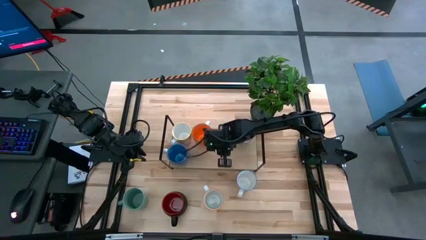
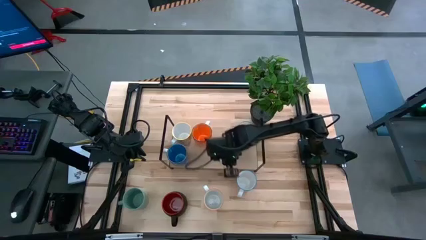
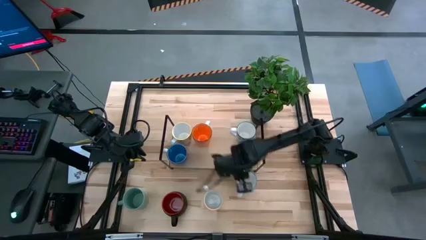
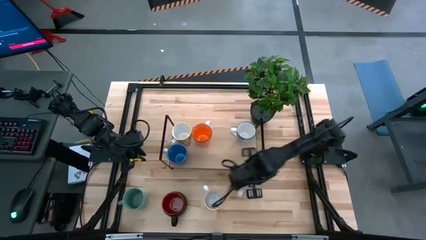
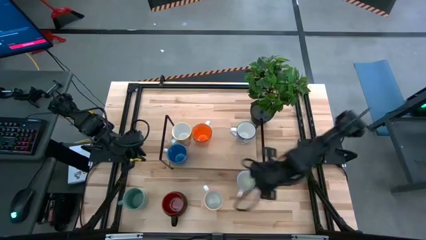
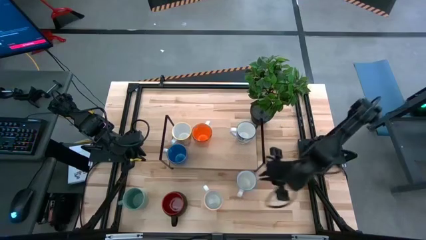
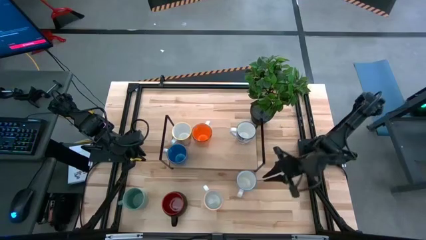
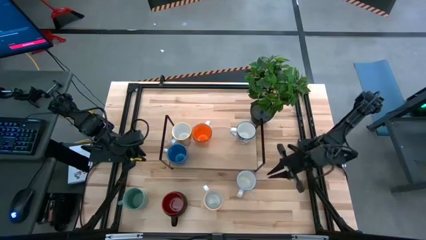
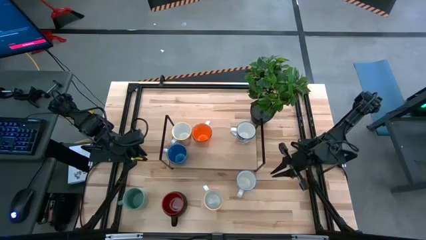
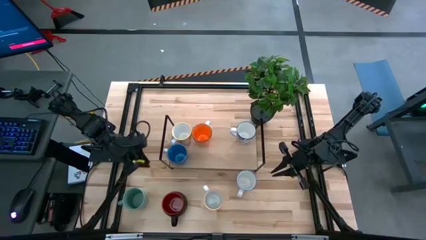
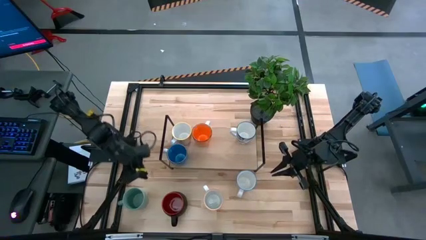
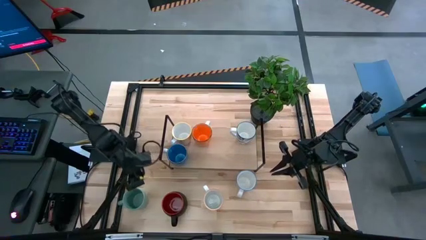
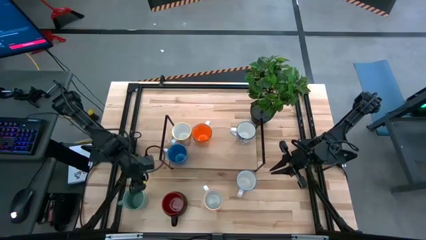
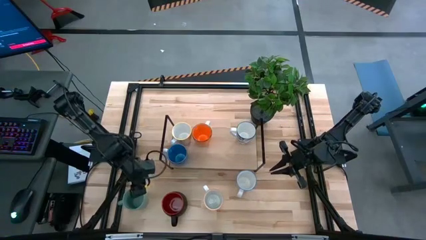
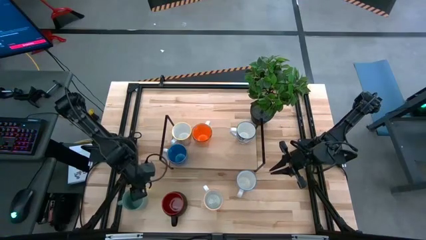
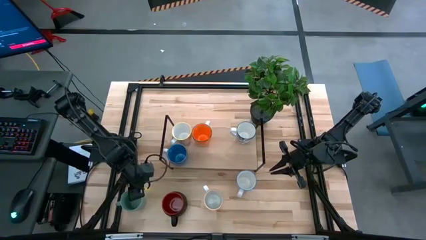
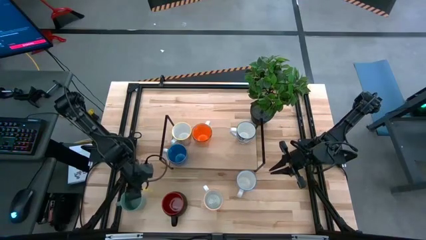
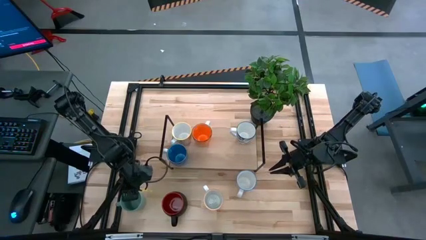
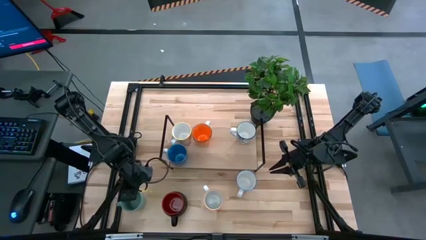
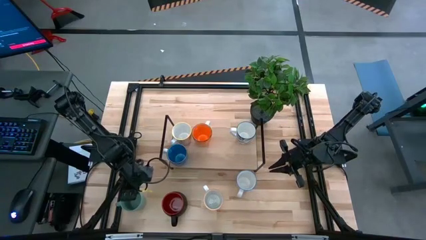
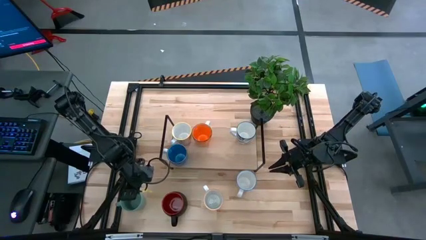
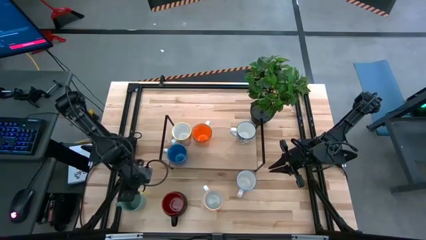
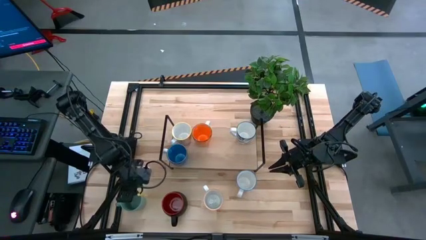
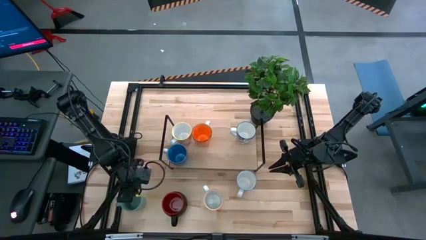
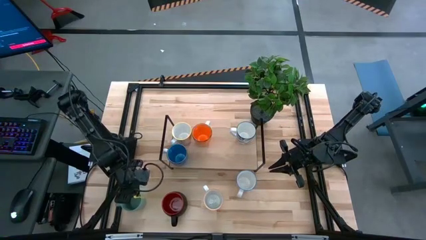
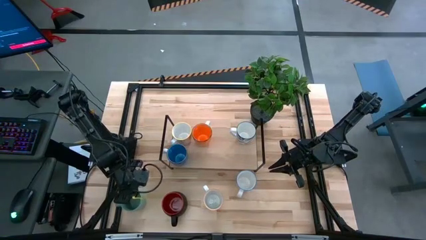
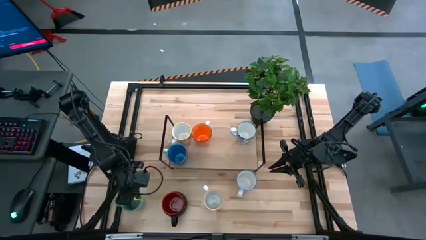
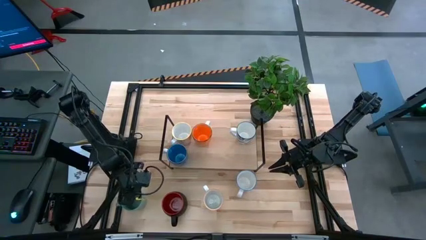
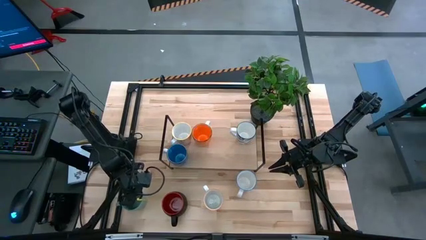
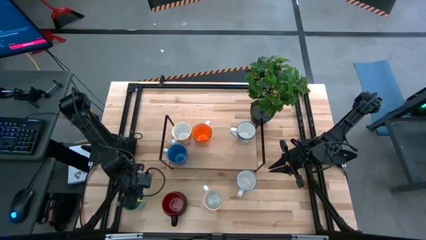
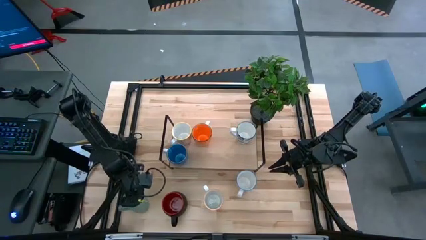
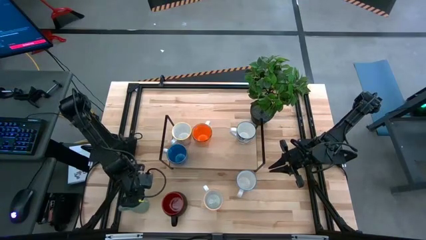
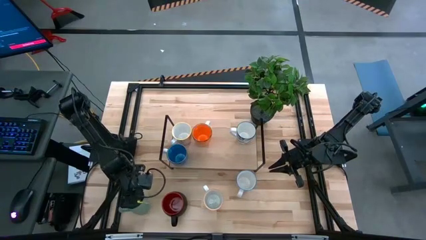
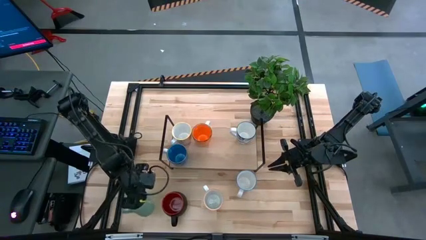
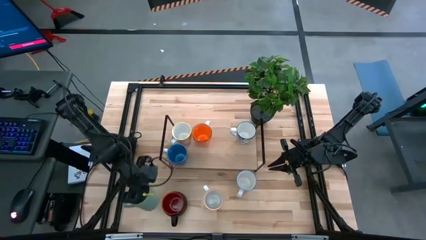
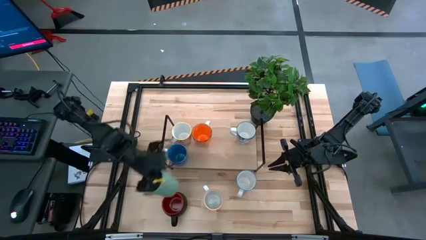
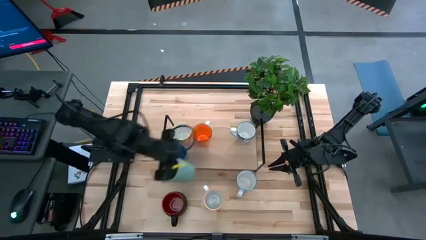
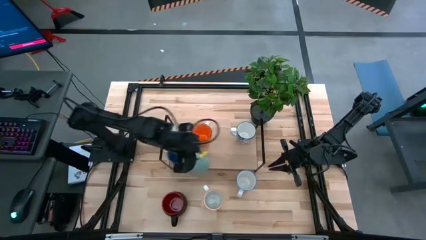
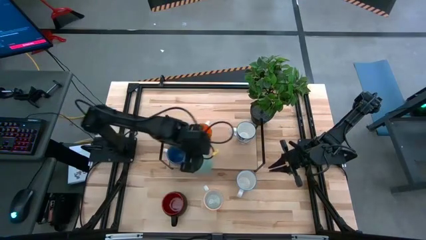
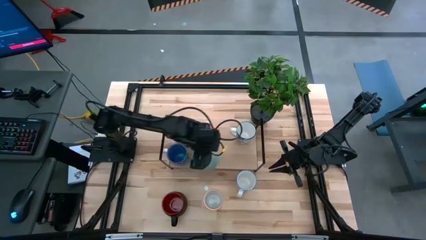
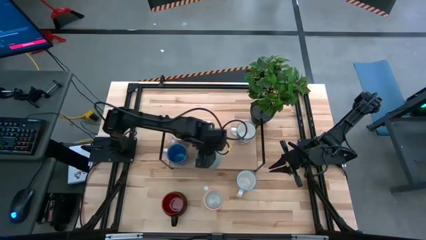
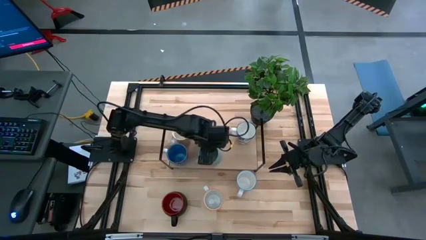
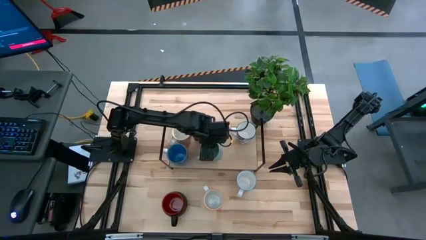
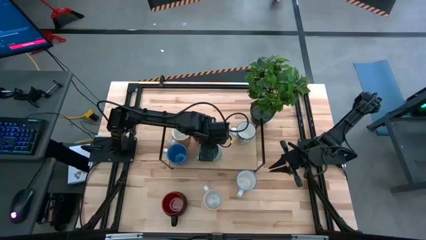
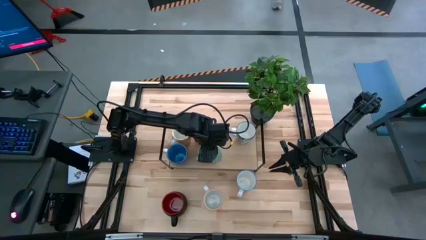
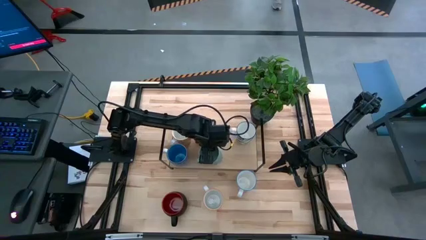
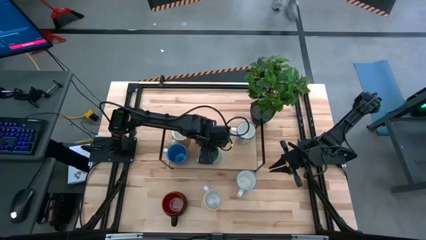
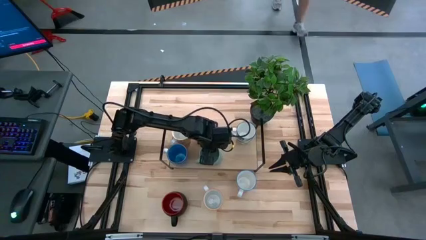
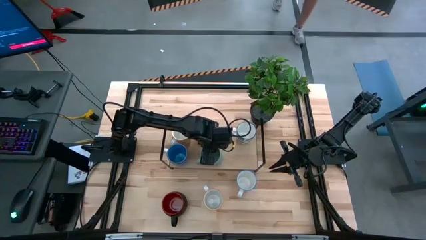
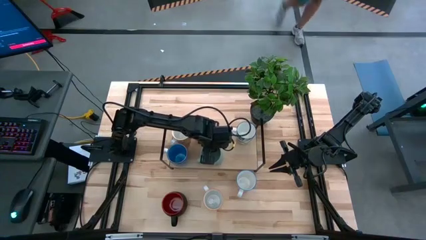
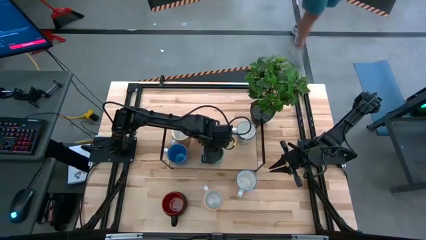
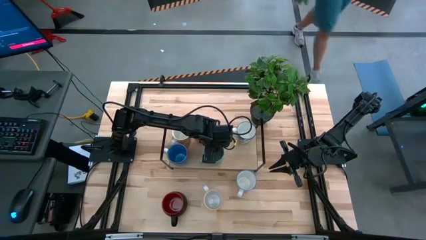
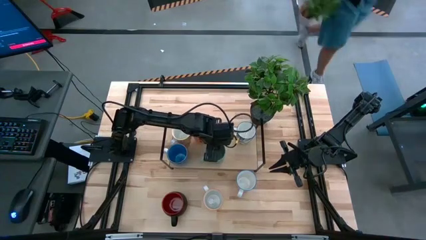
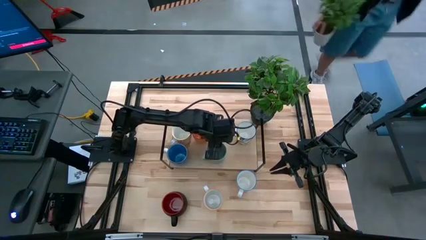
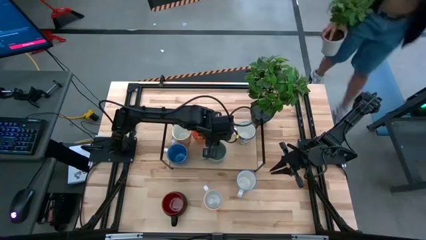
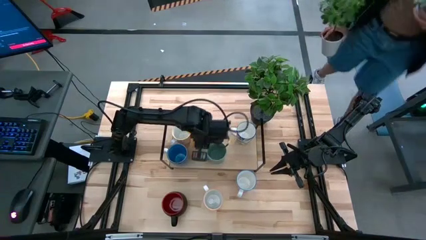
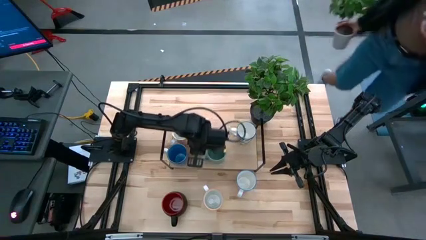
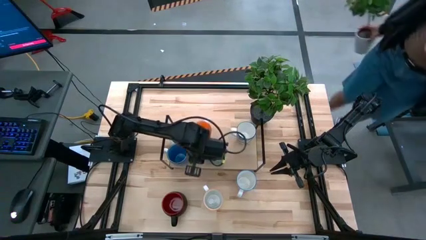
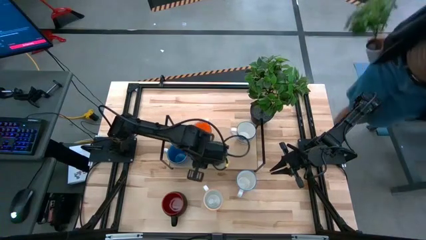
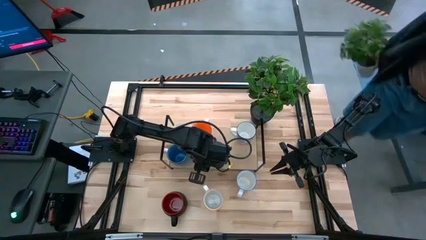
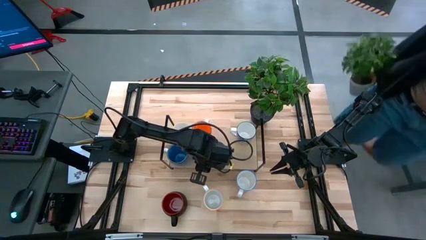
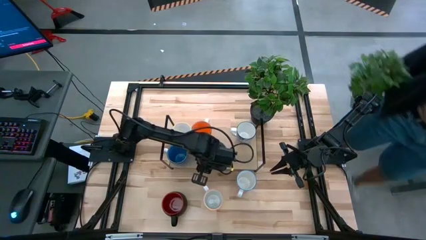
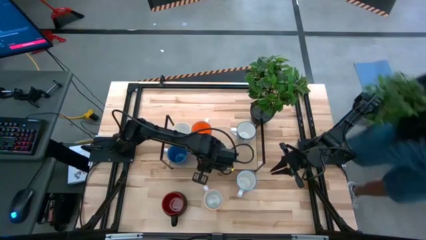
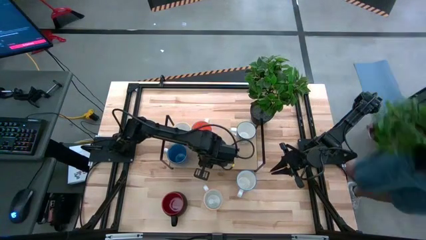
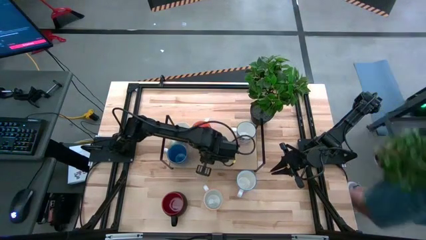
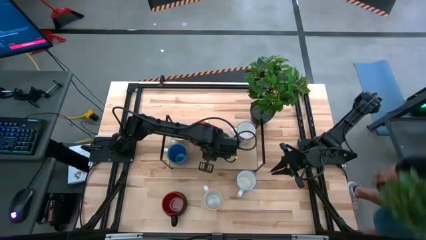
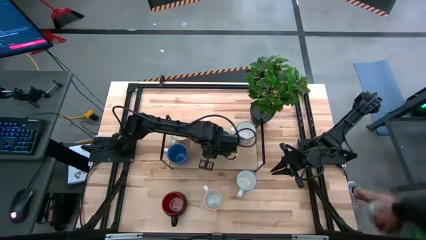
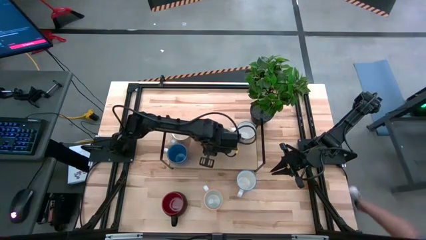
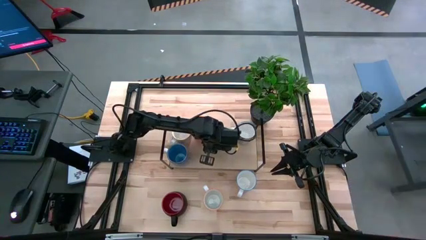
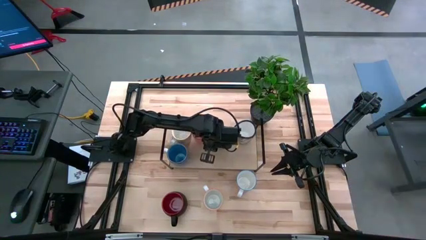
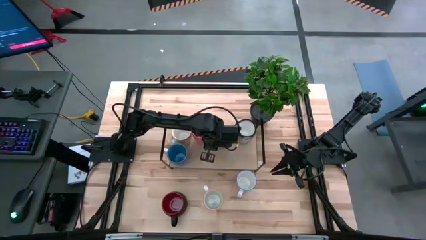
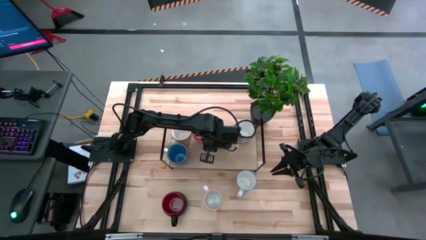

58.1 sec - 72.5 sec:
Task: Place coffee mugs
Put the light blue mug on the shelf
